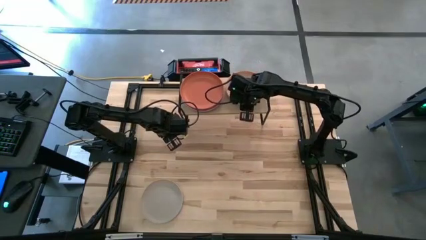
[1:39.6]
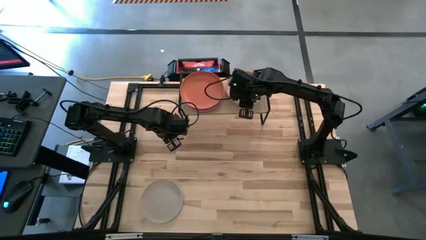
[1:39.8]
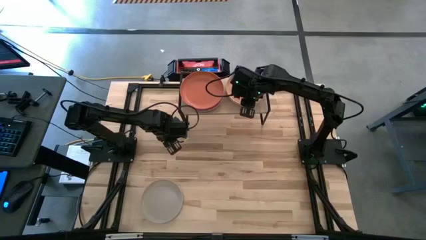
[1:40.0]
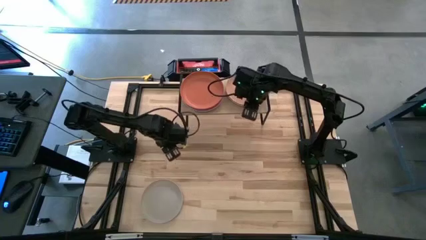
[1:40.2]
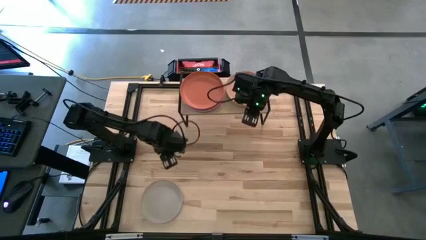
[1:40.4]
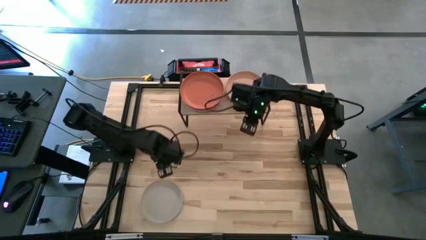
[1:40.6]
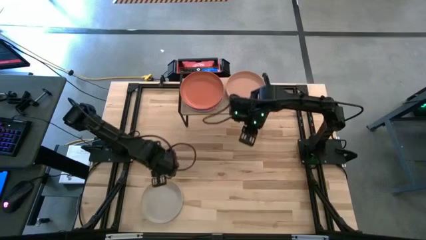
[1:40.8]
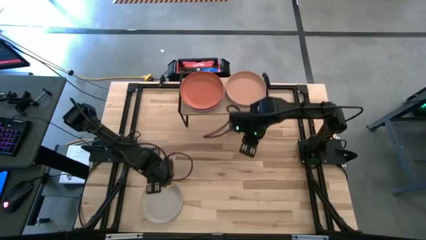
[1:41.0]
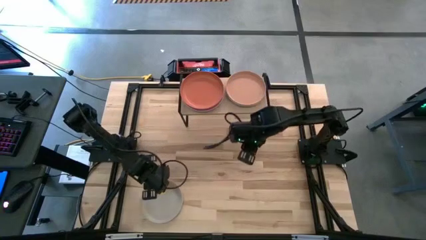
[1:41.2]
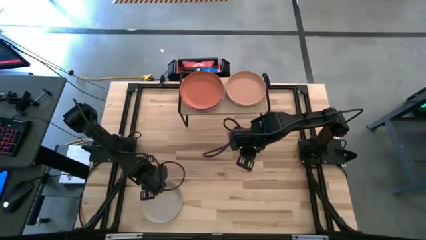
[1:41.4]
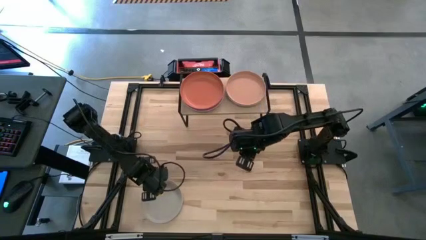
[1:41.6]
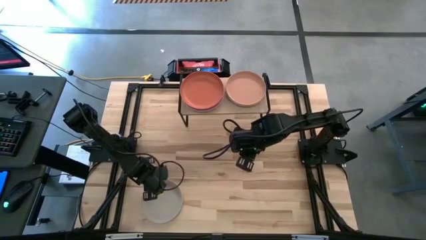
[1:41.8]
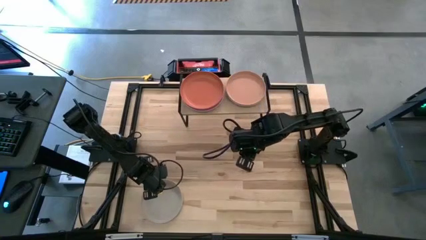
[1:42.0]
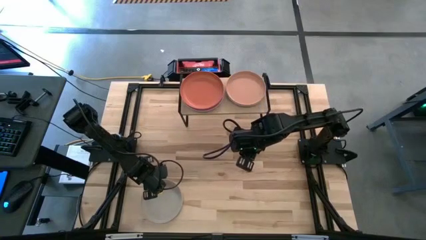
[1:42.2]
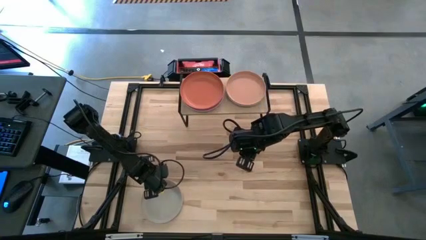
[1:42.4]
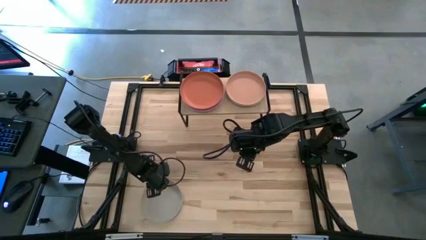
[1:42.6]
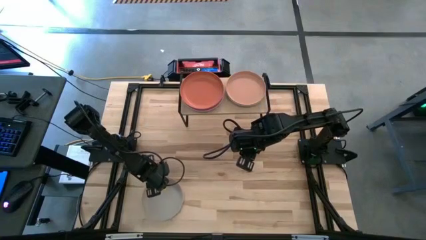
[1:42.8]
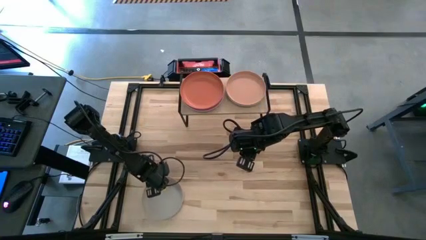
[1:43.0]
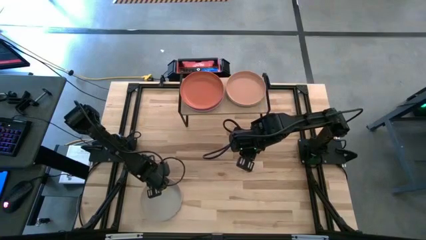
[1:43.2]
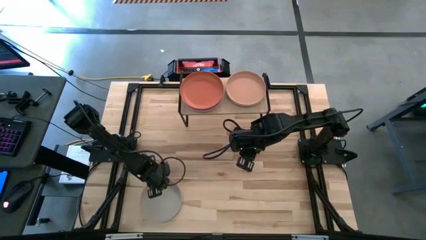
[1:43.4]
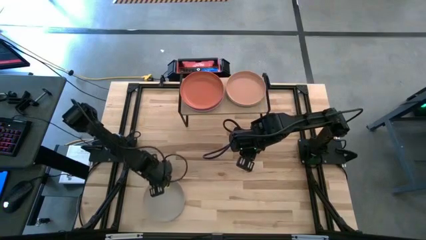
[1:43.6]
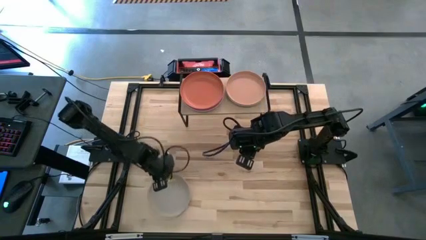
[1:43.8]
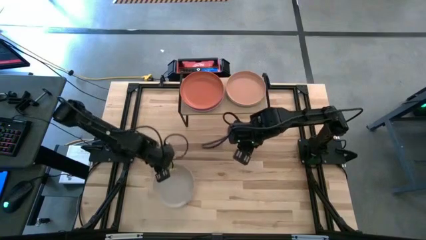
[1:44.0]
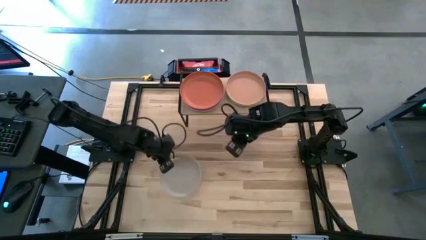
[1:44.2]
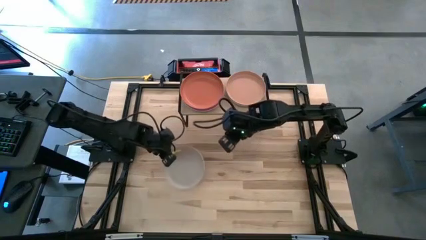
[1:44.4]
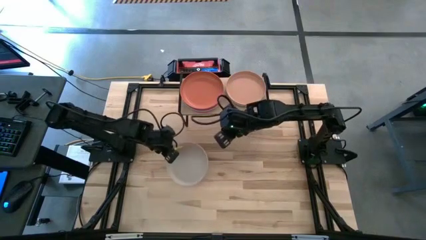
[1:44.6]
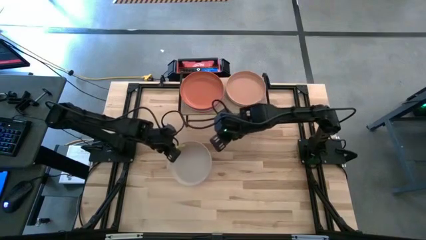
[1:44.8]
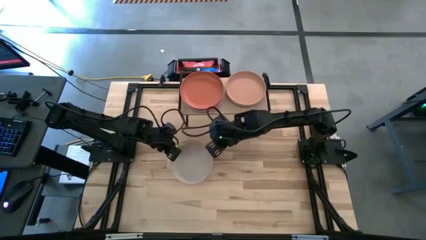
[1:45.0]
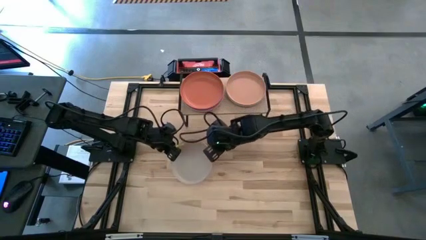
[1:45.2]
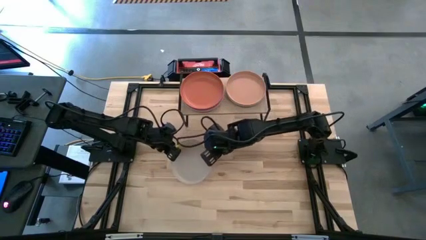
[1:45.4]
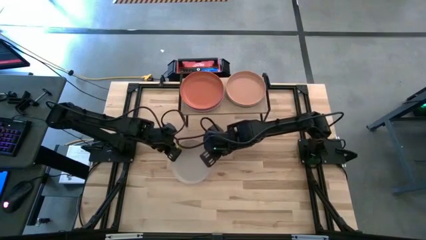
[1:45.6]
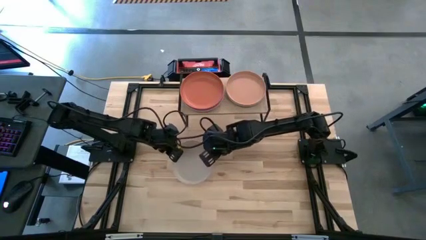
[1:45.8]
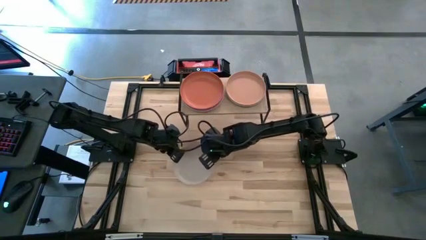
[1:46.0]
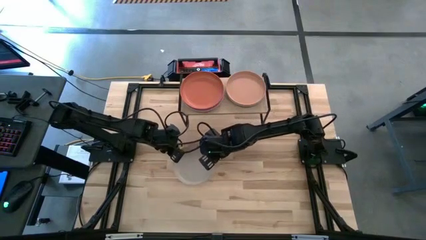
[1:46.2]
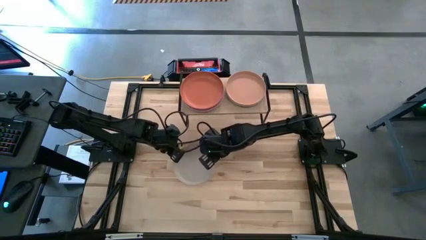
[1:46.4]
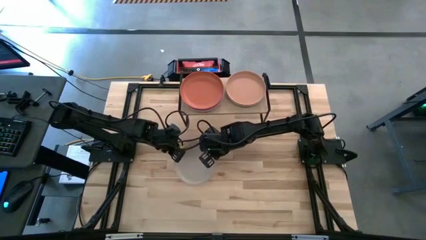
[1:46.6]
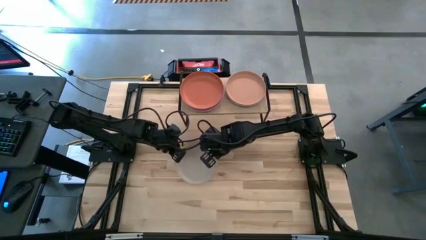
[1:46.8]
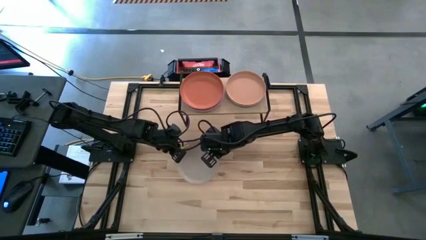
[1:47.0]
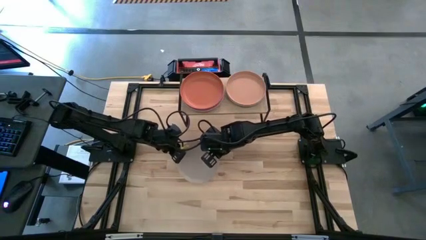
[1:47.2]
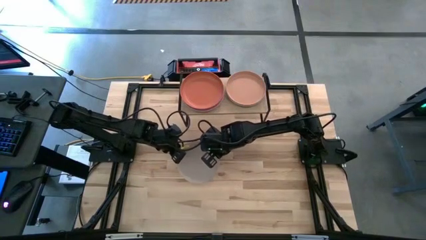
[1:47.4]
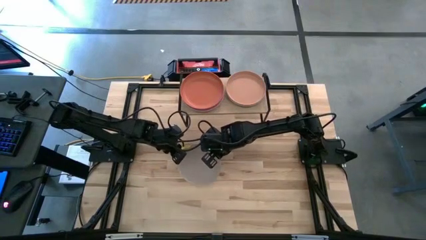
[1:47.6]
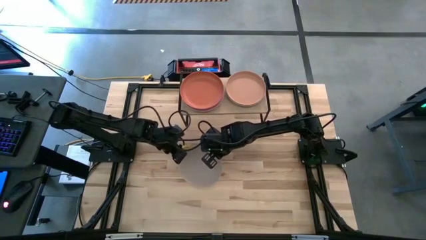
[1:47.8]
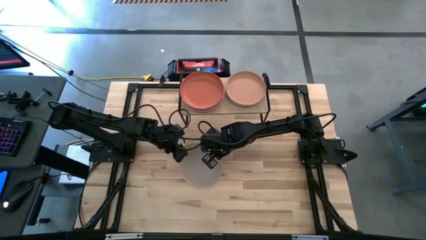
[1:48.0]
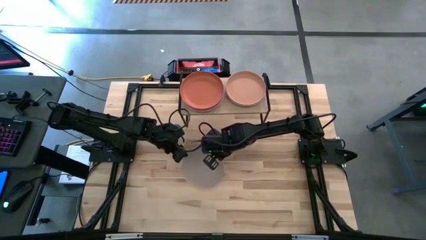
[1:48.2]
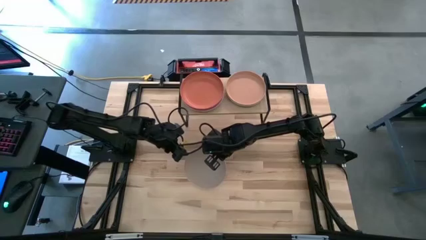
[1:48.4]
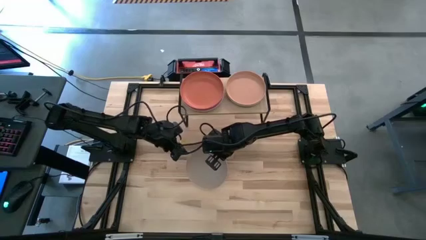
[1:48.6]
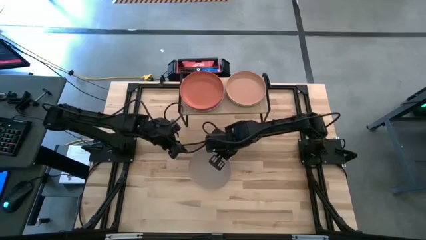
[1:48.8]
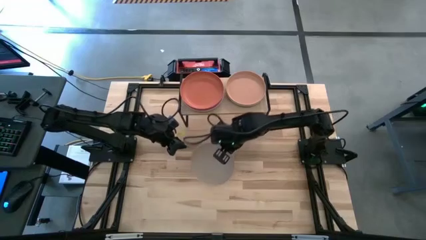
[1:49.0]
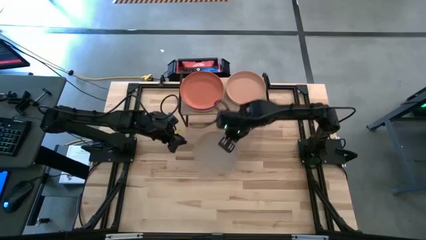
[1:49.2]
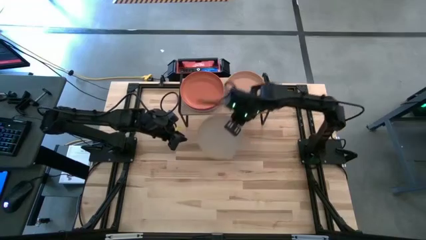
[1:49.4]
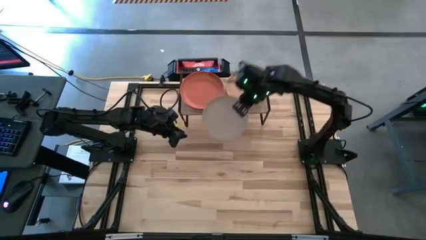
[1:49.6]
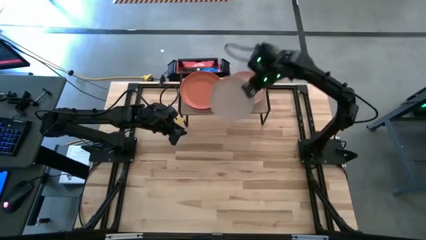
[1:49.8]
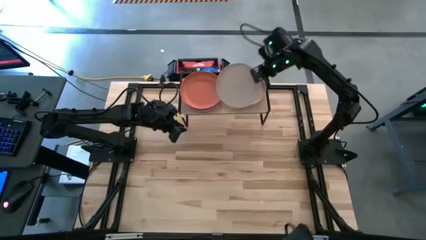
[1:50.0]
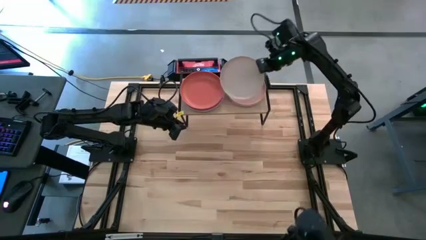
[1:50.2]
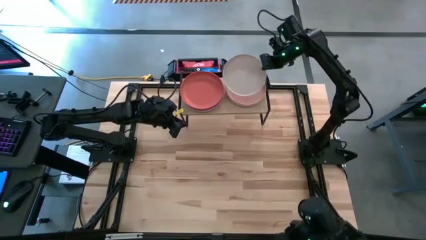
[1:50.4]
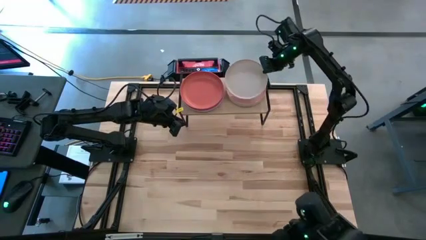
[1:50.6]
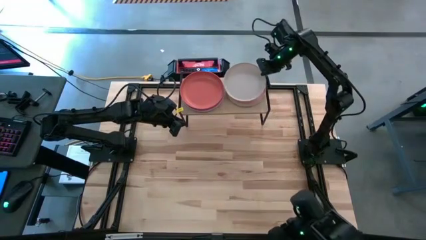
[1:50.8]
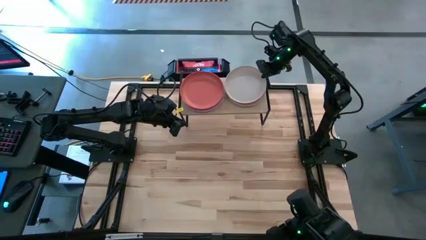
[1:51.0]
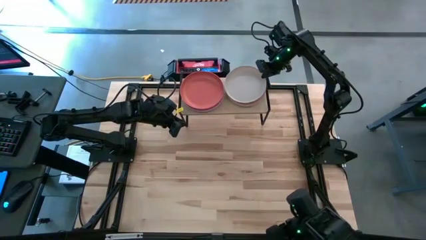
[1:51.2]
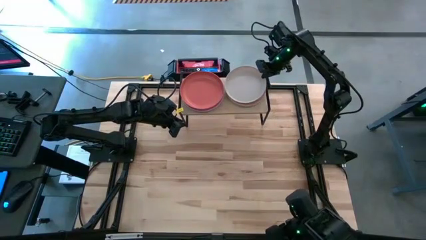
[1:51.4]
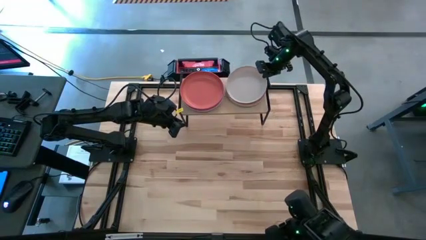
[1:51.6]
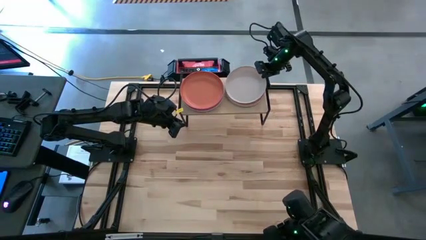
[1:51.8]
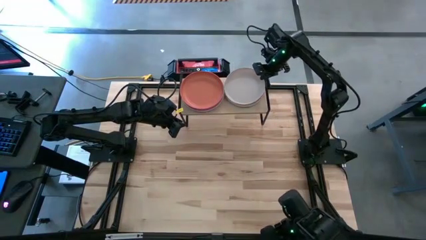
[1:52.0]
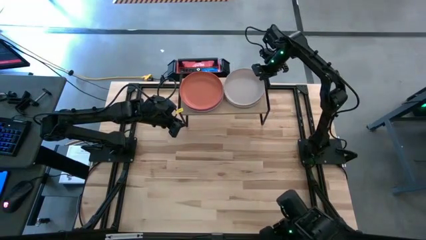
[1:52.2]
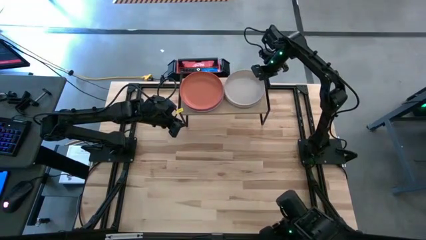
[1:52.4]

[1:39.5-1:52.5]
Task: Place and stack plates onto a shelf
Stack the gray plate on top of the brown plate on the shelf
